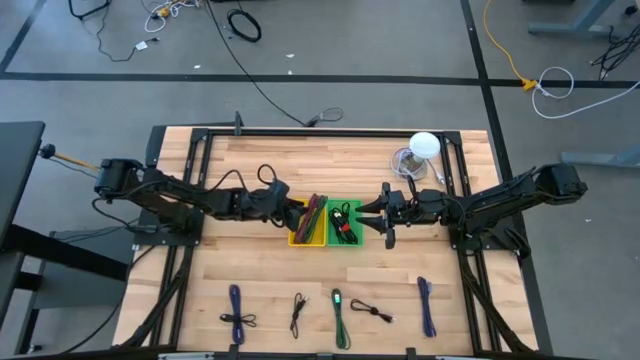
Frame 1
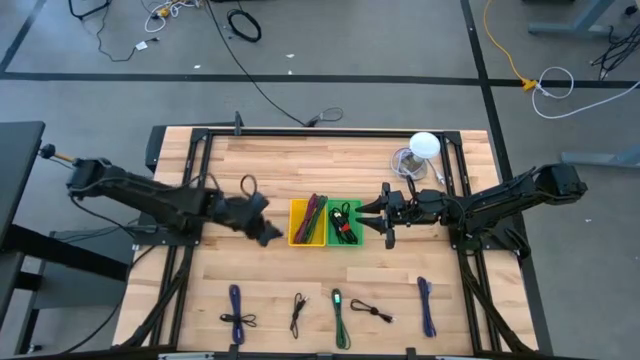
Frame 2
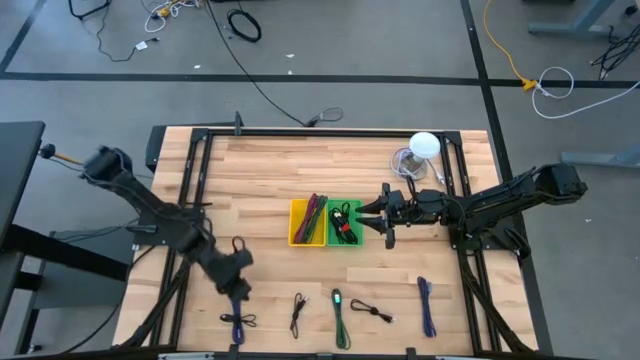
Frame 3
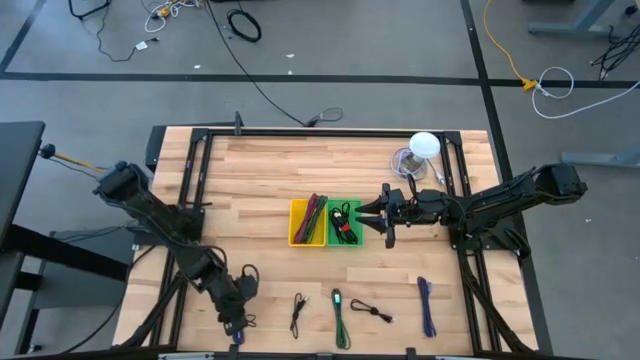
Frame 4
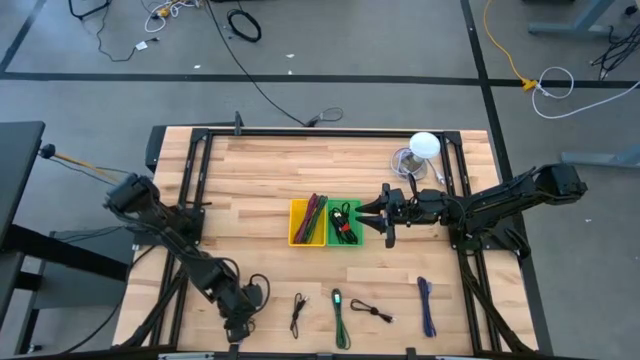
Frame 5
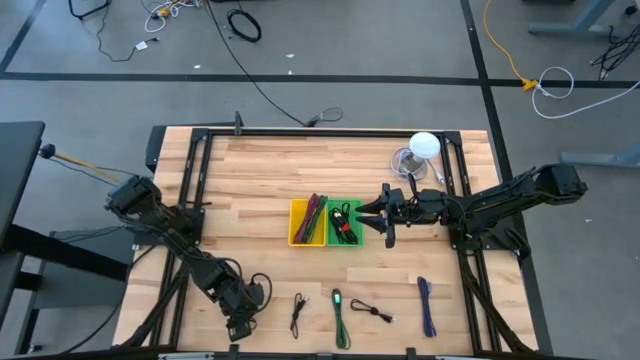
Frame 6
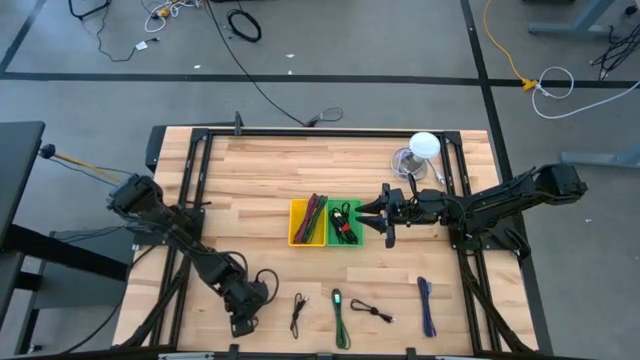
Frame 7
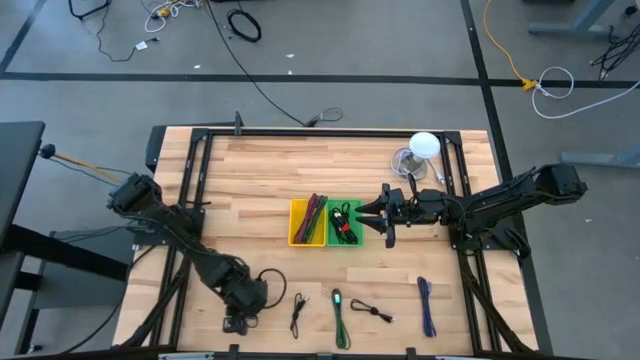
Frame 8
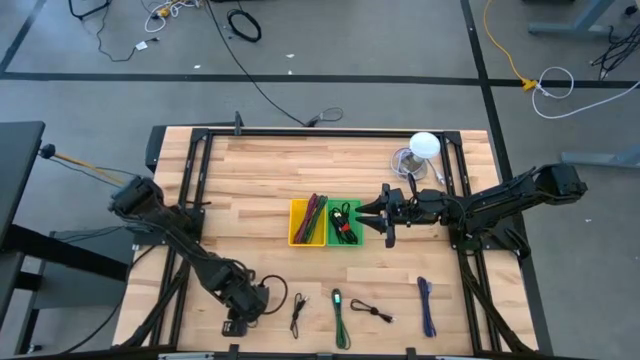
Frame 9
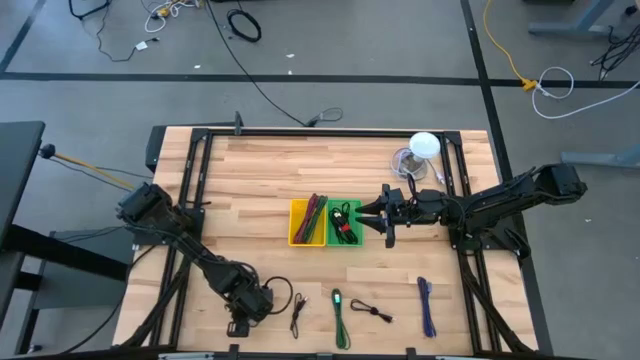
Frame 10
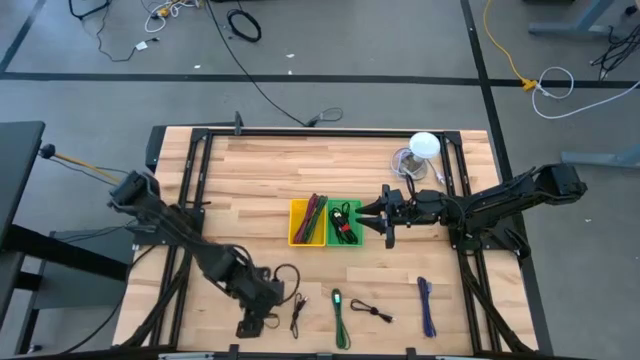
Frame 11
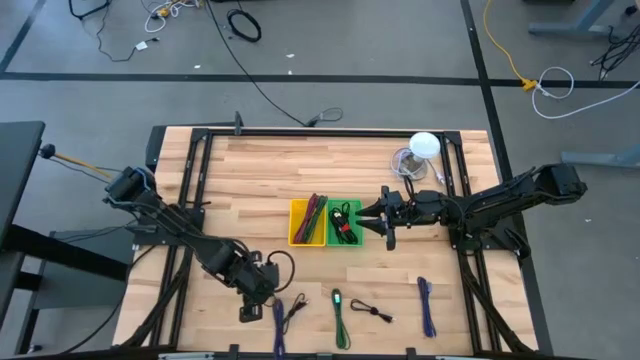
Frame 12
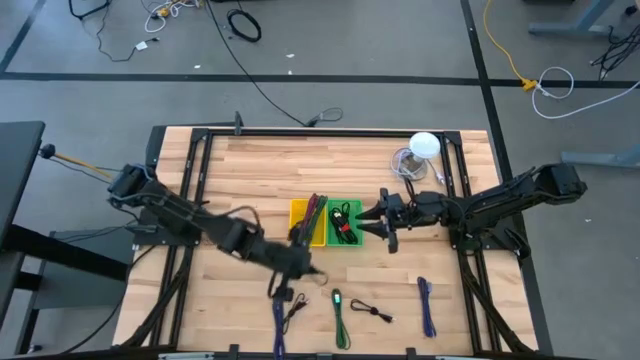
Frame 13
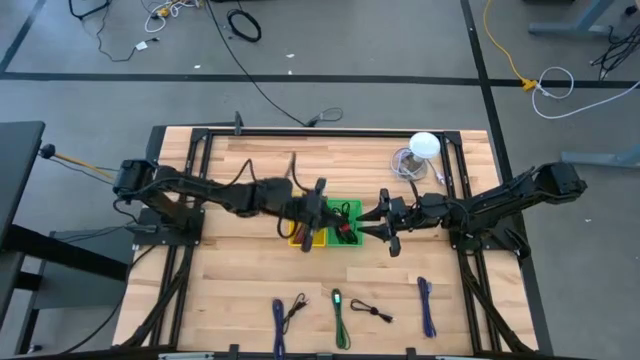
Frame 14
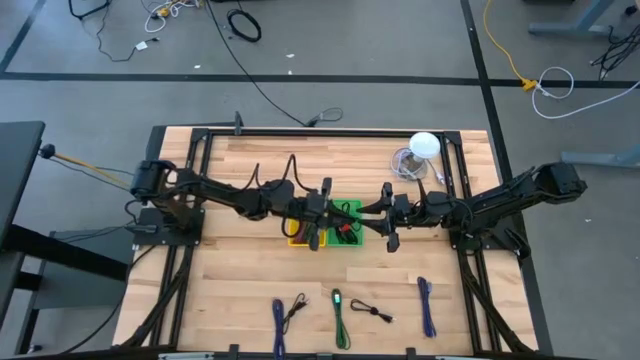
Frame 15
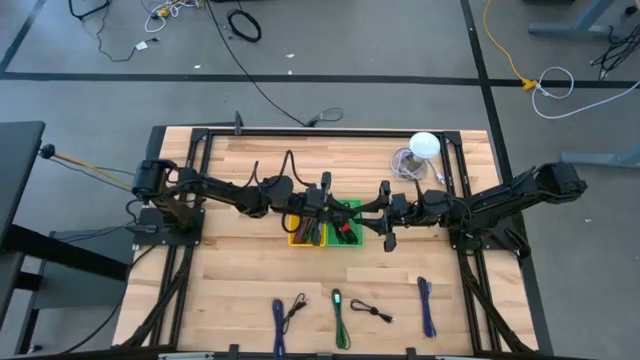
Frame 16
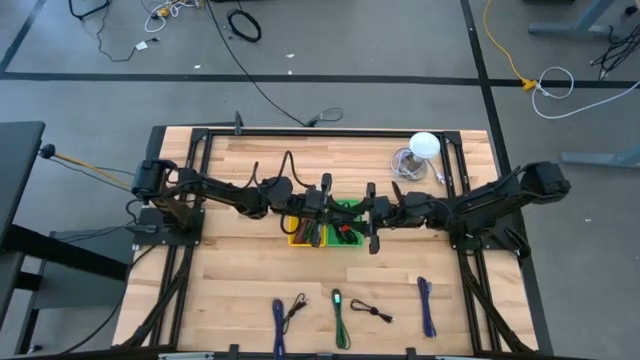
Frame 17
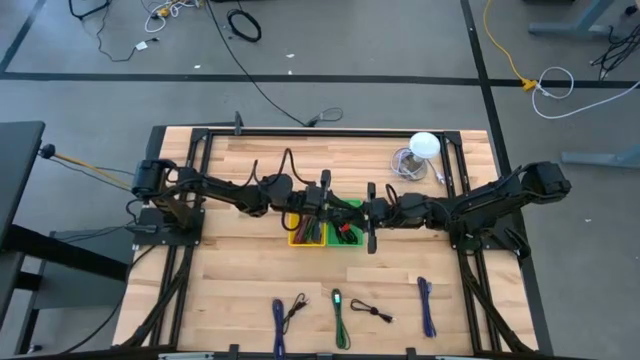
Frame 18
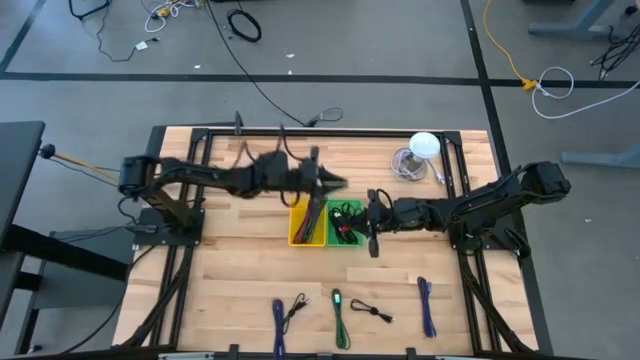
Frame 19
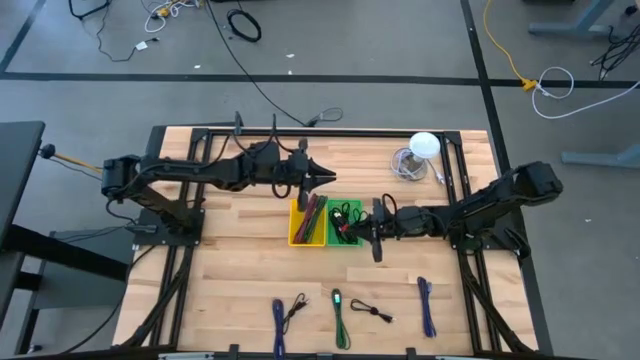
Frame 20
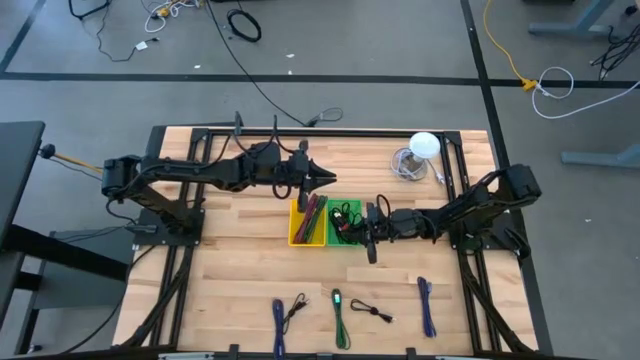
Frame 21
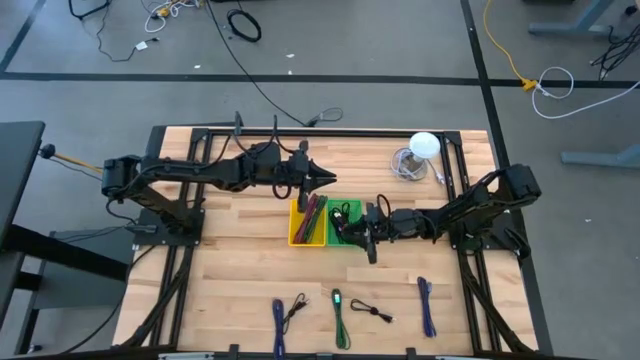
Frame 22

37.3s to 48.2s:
Task: Pick & Place USB Port
Put the black charger cable into the green basket

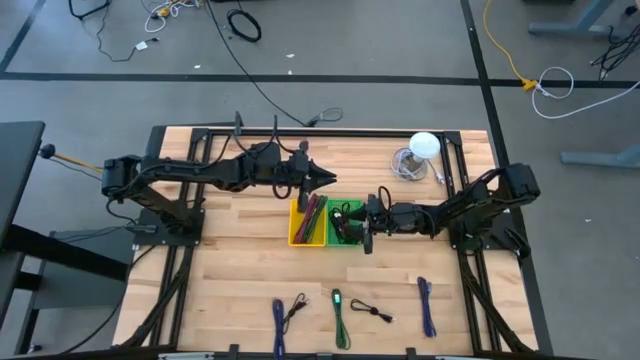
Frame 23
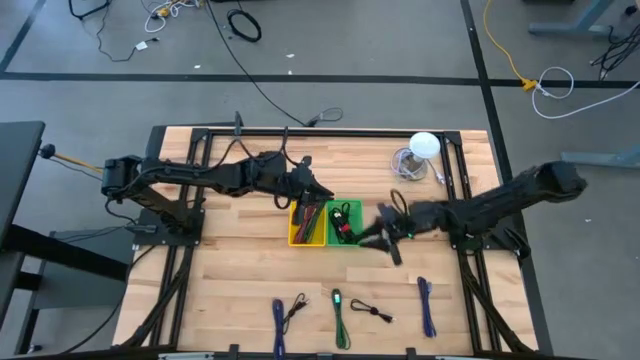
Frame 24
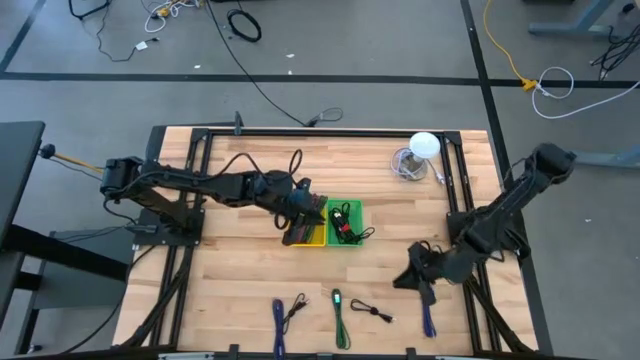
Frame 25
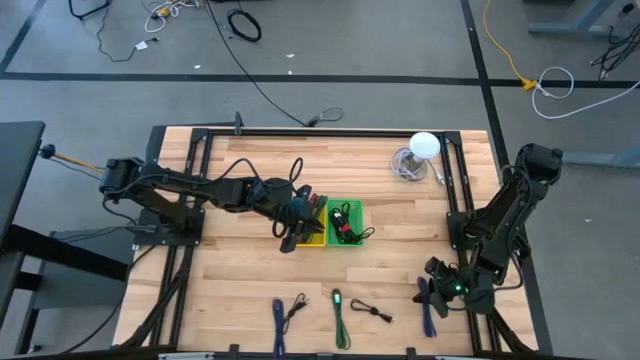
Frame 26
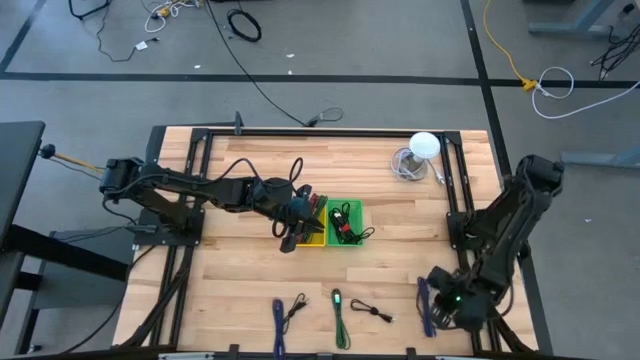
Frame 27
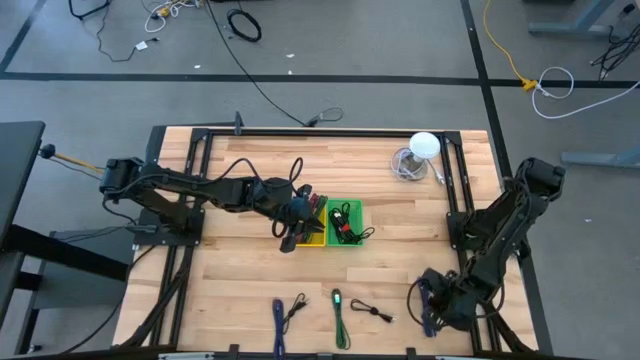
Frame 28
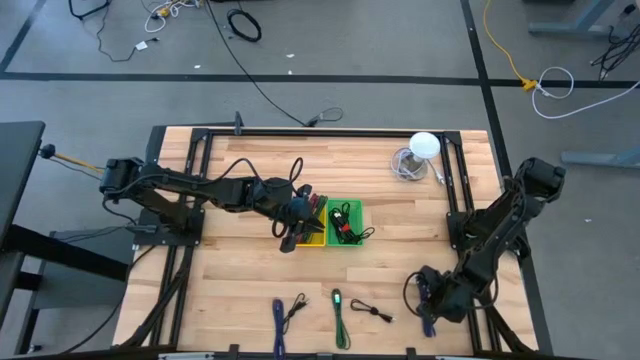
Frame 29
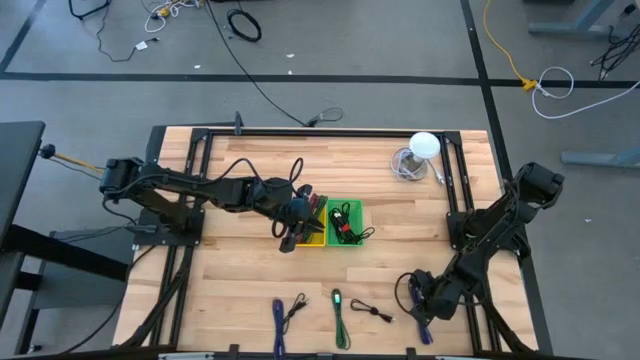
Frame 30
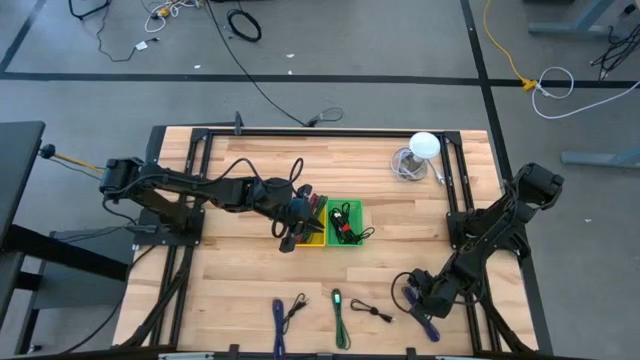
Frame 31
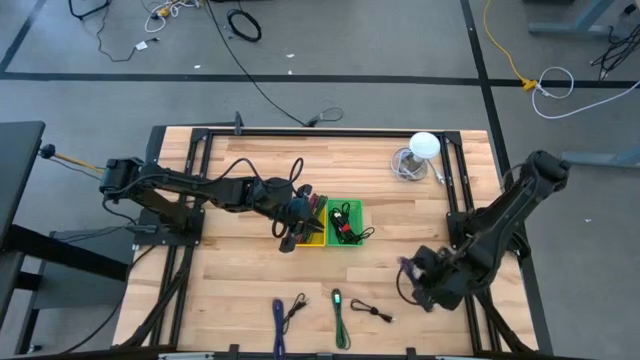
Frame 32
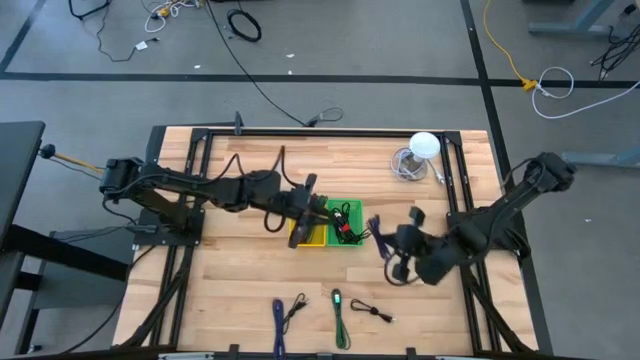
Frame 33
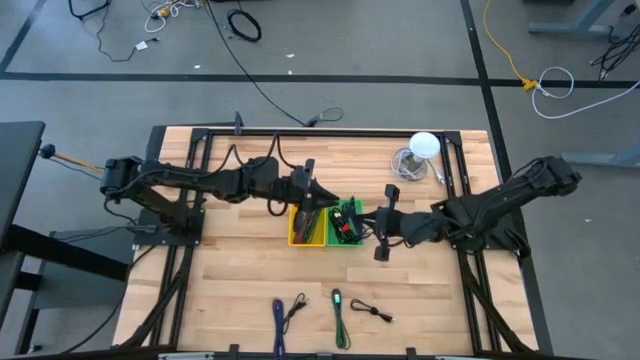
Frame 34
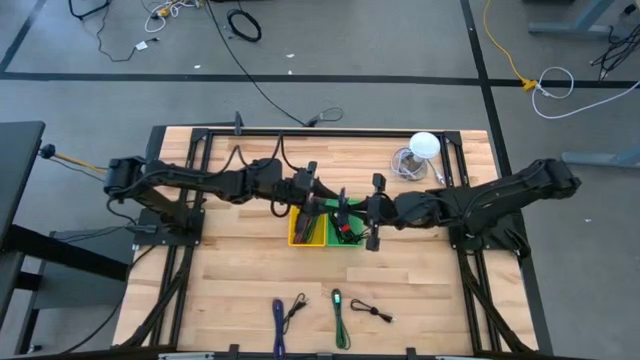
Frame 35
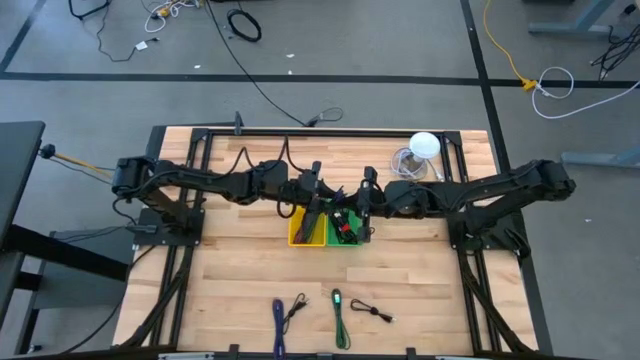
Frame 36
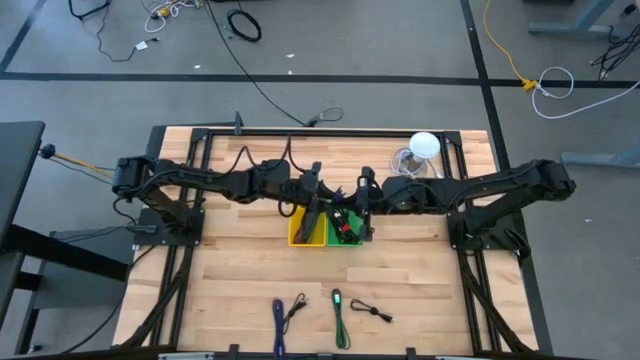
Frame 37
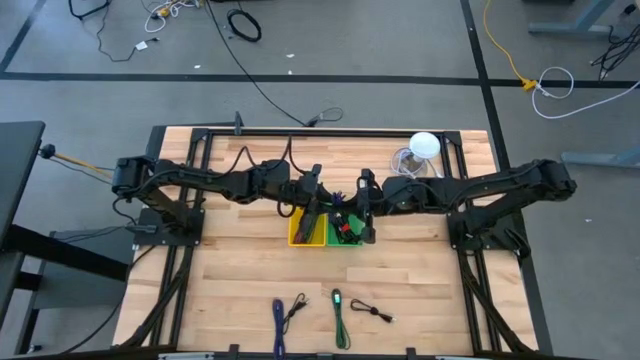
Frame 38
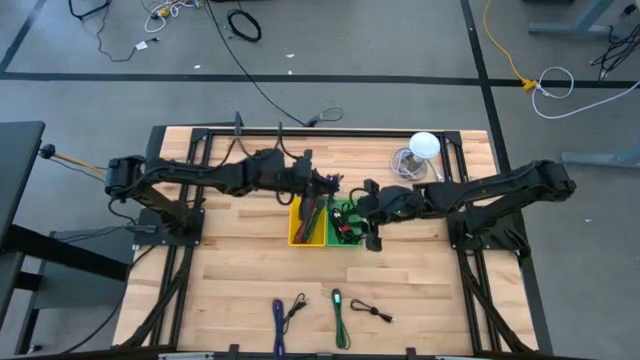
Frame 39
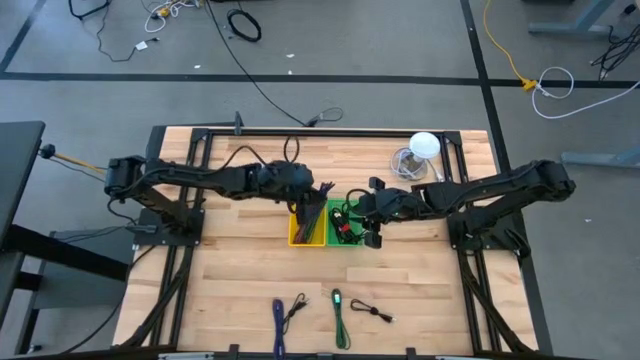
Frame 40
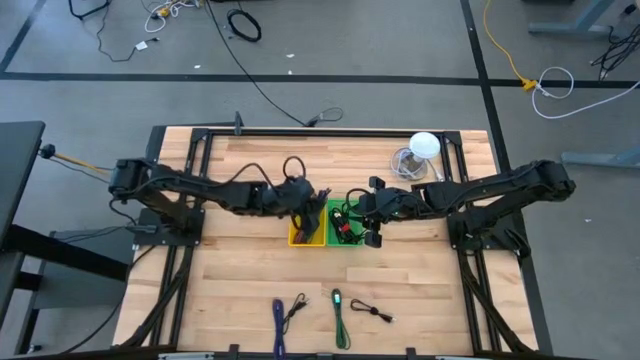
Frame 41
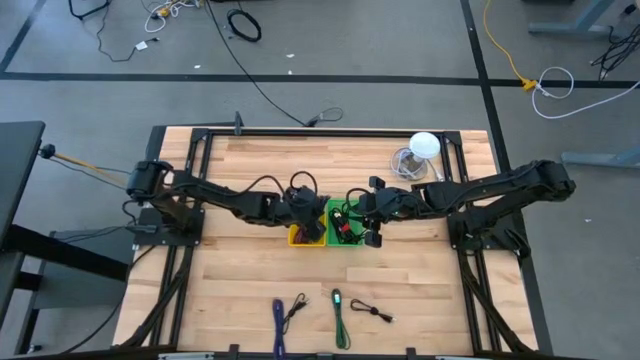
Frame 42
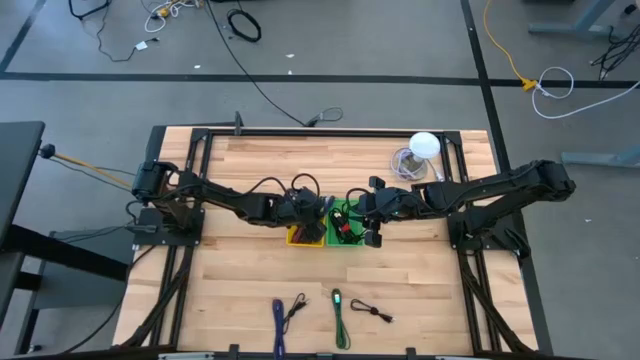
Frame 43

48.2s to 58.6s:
Put the violet charger cable into the yellow basket
